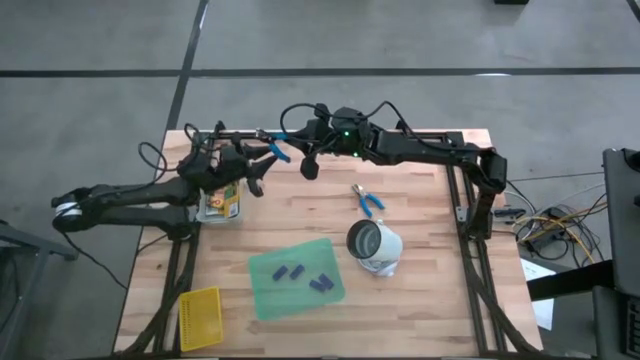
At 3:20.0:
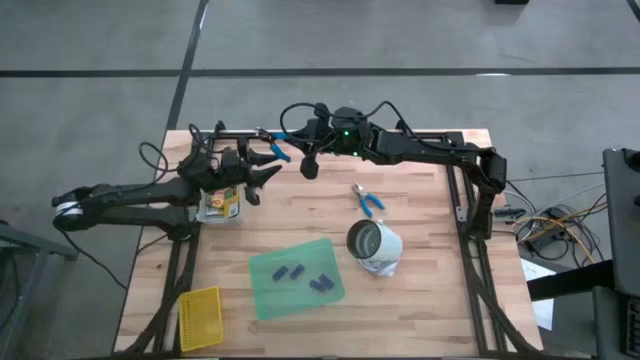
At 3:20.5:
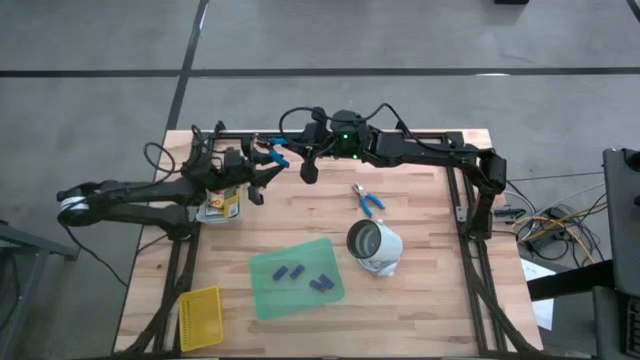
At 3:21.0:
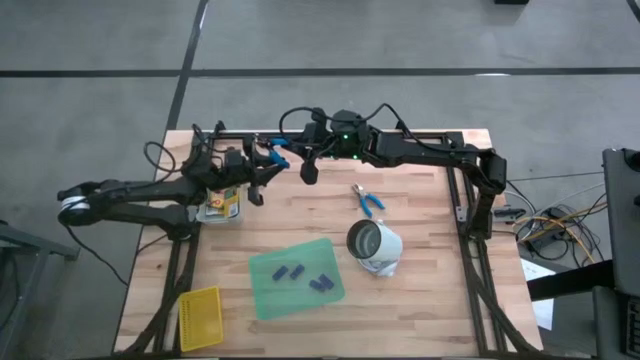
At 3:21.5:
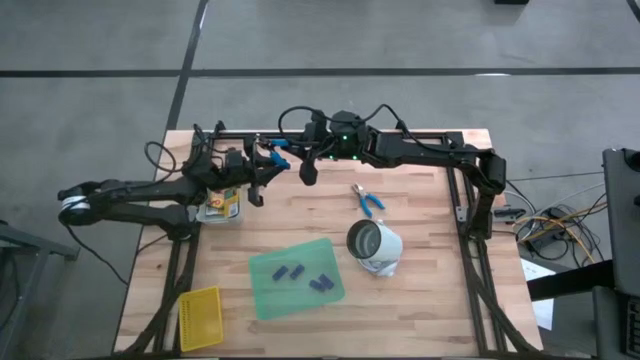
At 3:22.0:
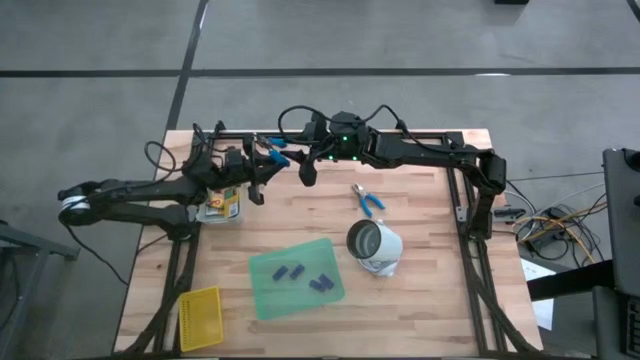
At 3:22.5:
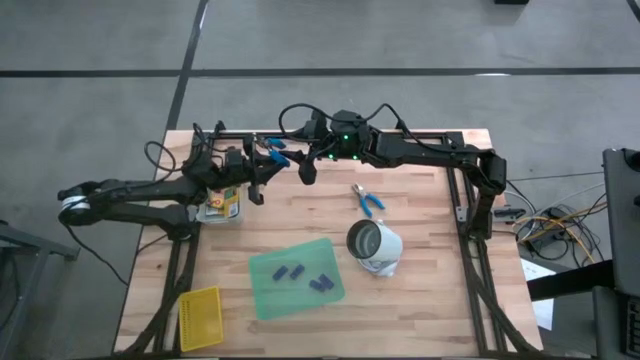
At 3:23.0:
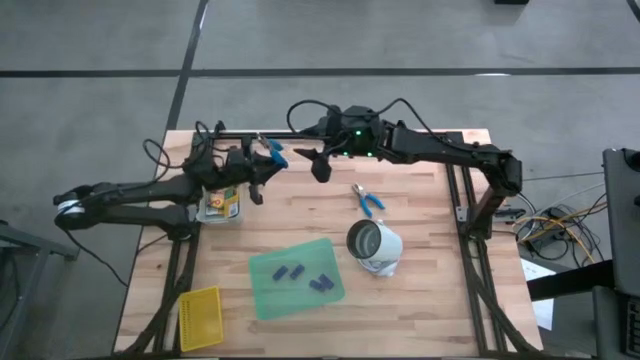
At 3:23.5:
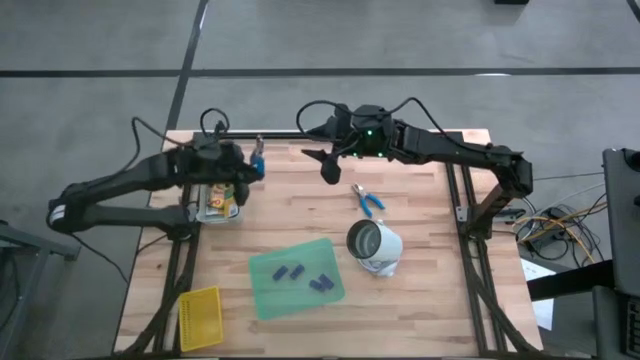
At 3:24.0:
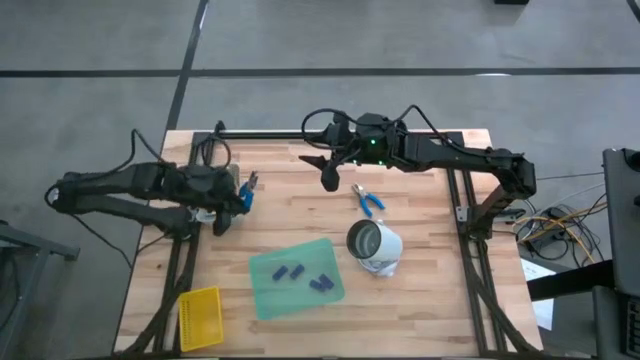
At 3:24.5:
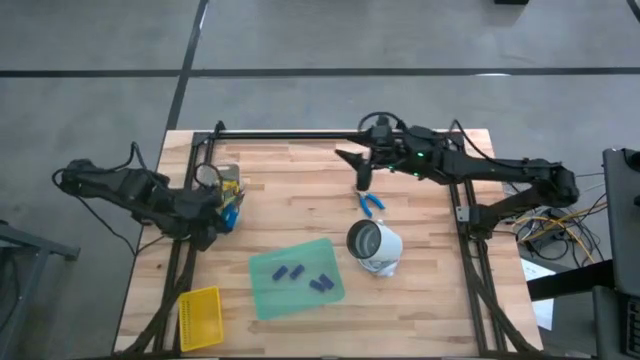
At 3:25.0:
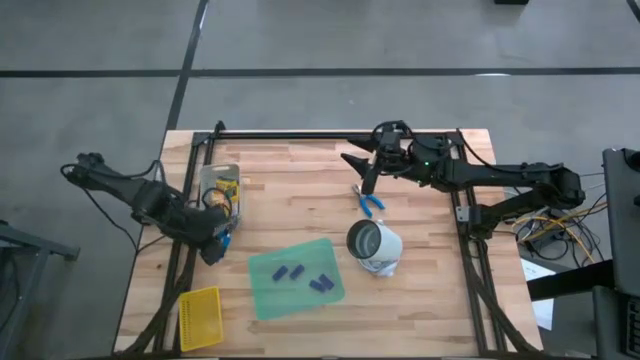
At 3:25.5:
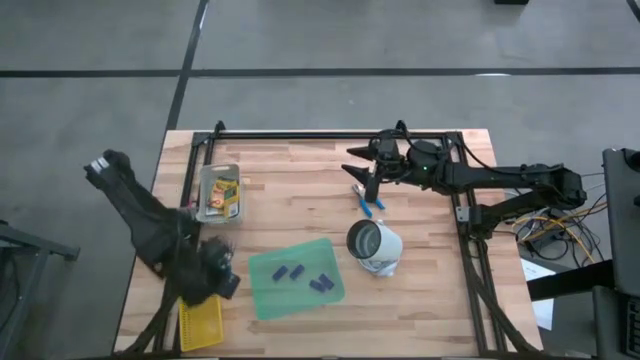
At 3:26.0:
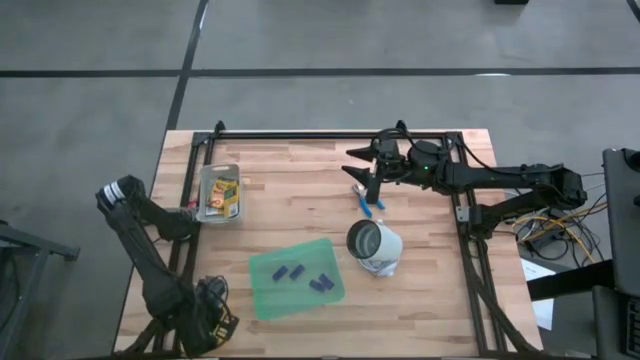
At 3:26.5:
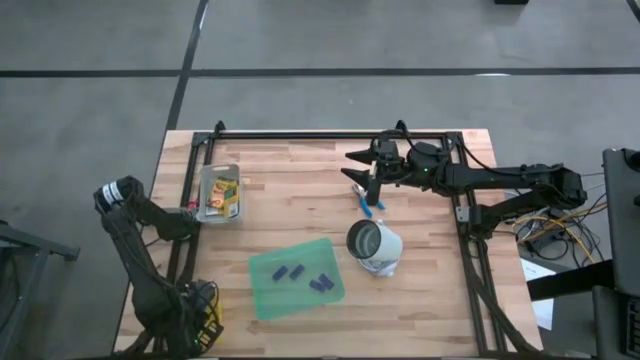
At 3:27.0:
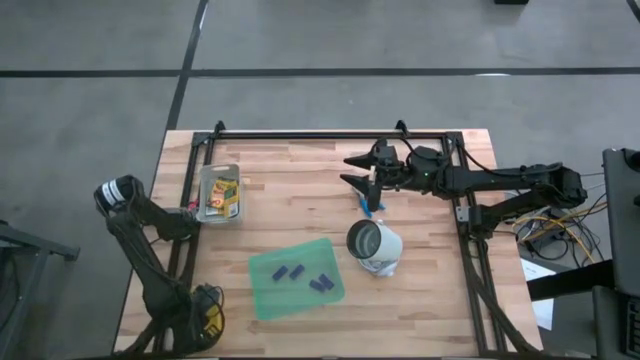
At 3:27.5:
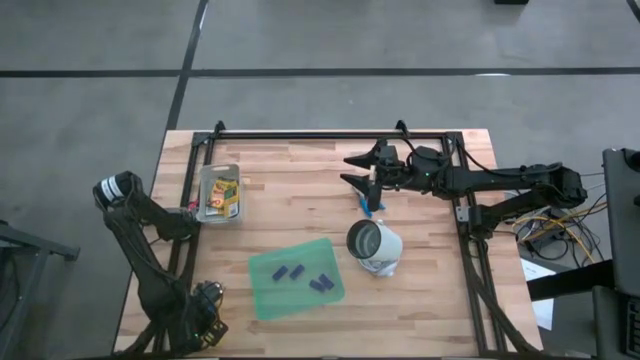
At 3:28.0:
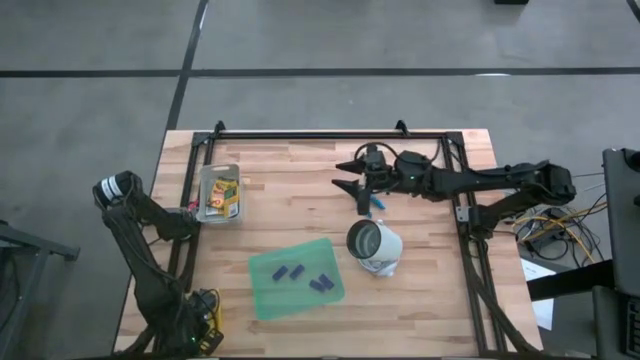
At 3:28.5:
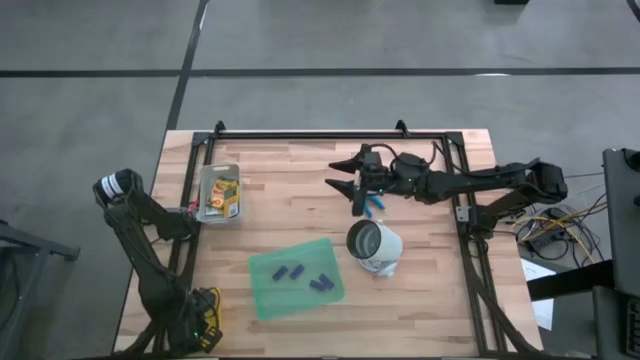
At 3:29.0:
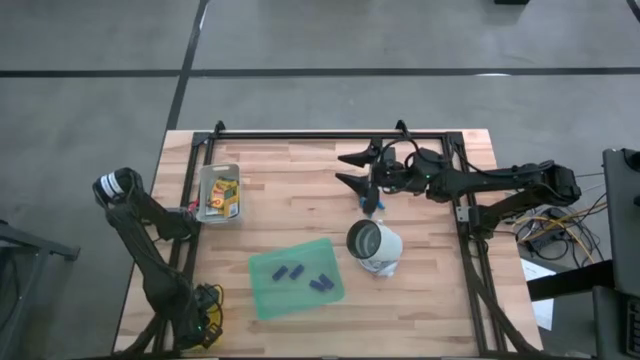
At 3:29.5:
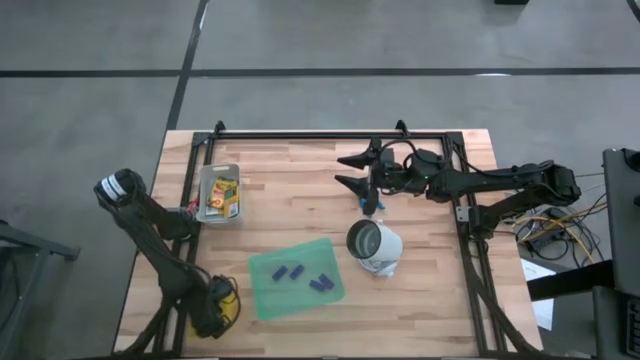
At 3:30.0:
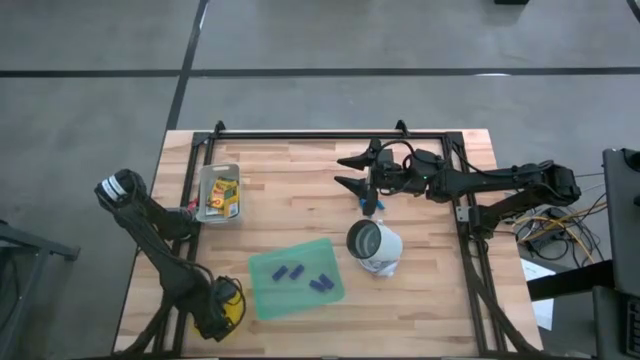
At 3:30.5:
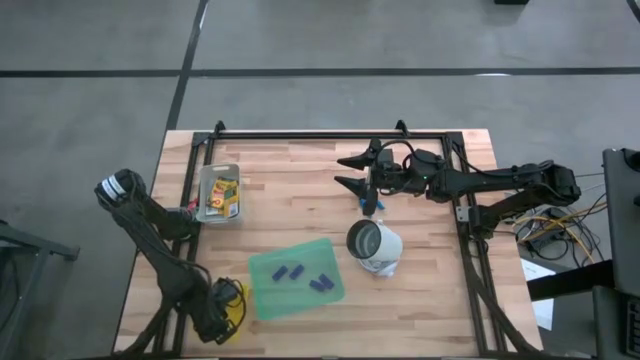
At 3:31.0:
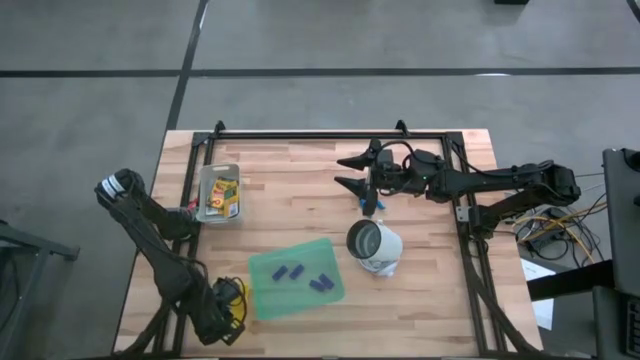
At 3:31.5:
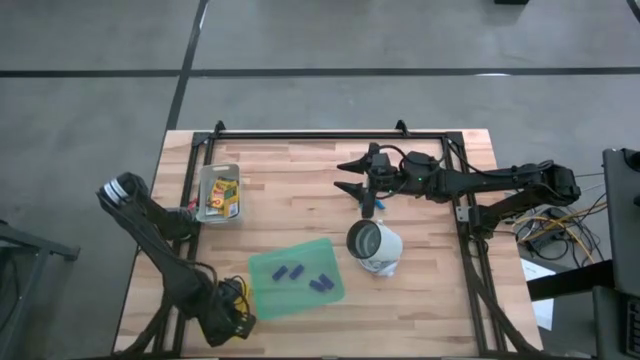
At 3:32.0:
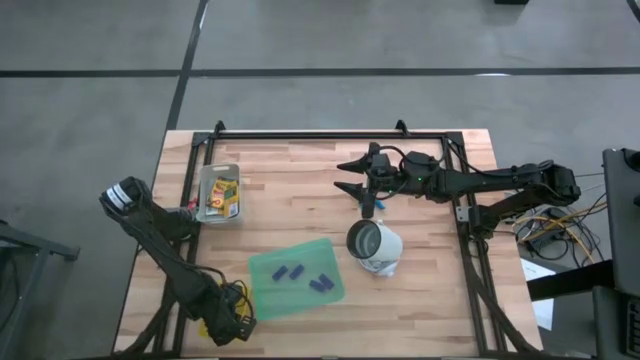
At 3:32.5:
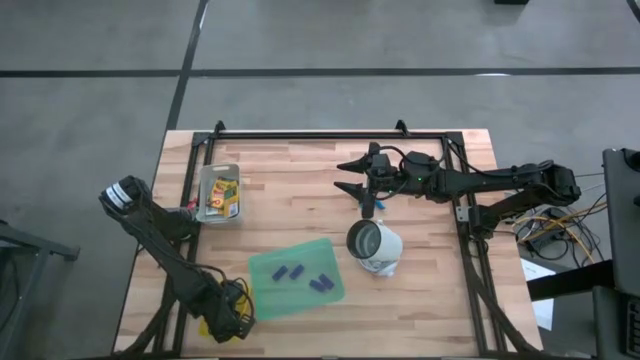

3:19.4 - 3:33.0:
Task: Pick & Place School Supplies
Put the blue hole puncher into the yellow bin

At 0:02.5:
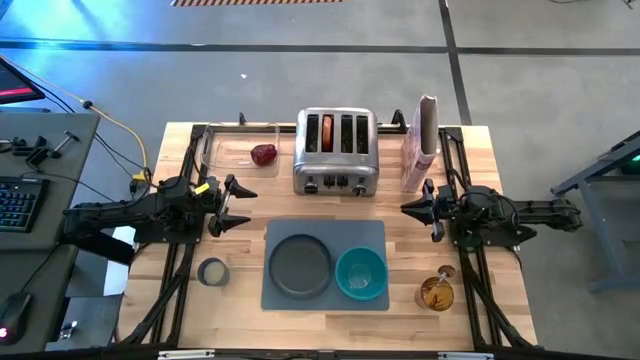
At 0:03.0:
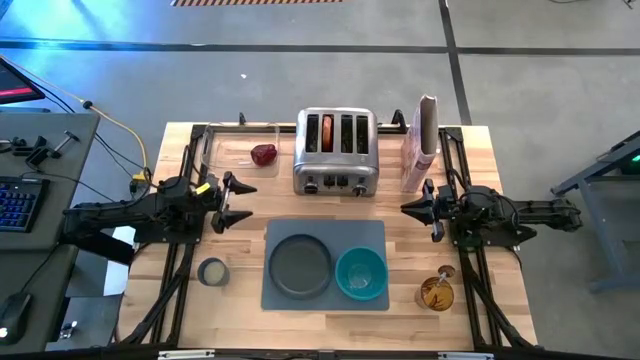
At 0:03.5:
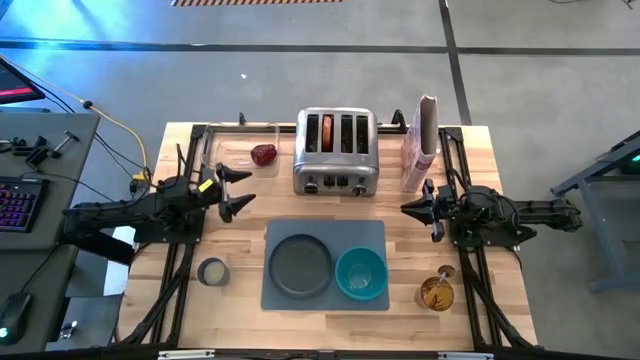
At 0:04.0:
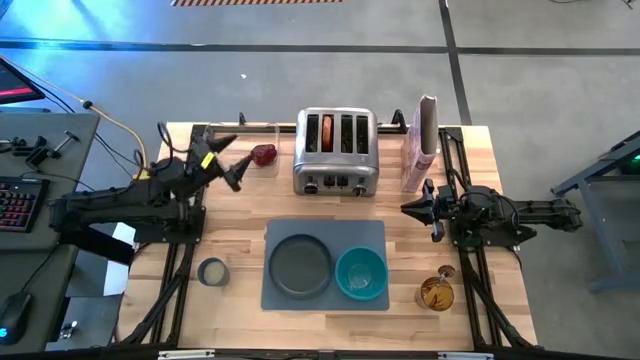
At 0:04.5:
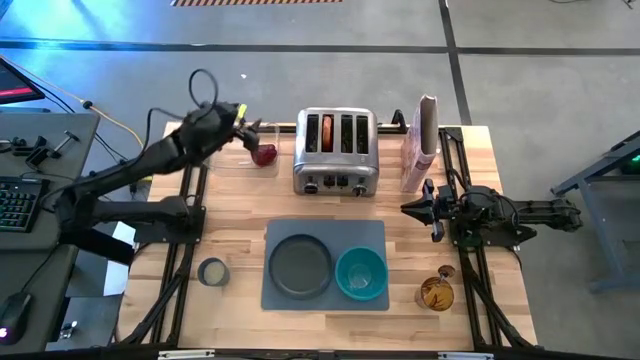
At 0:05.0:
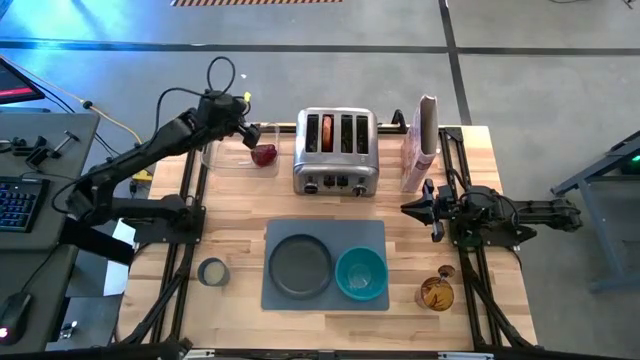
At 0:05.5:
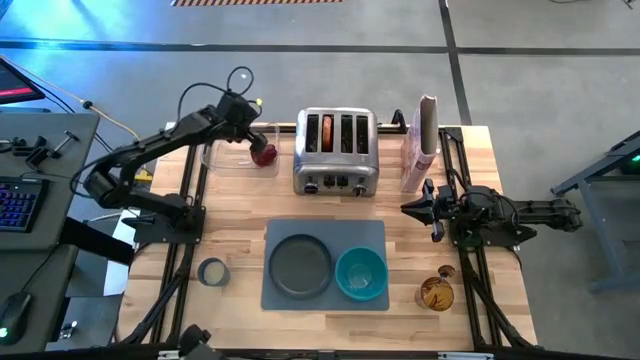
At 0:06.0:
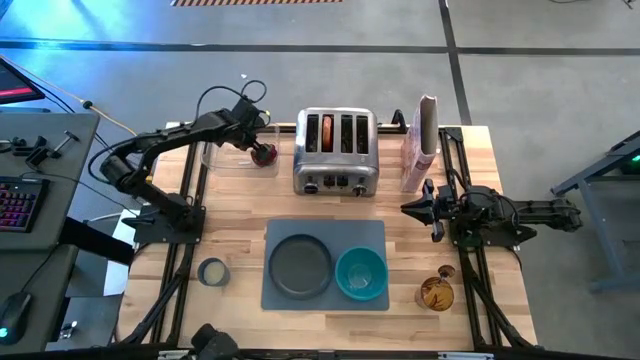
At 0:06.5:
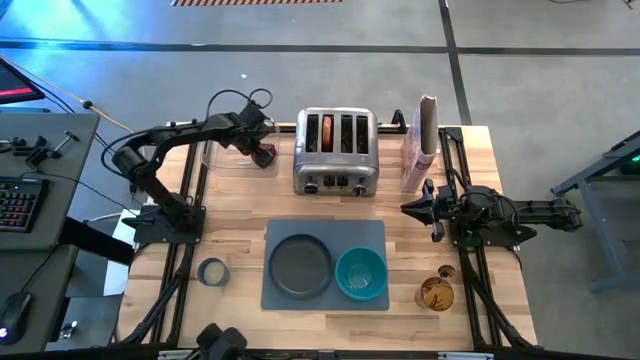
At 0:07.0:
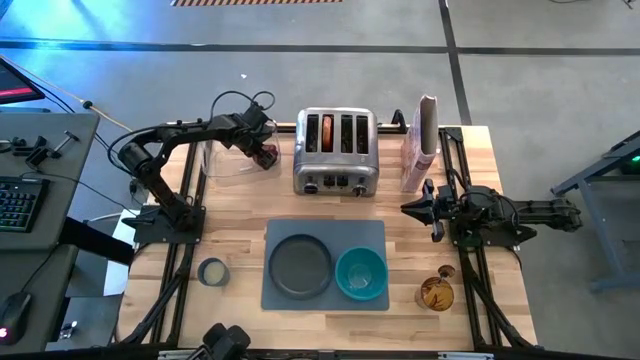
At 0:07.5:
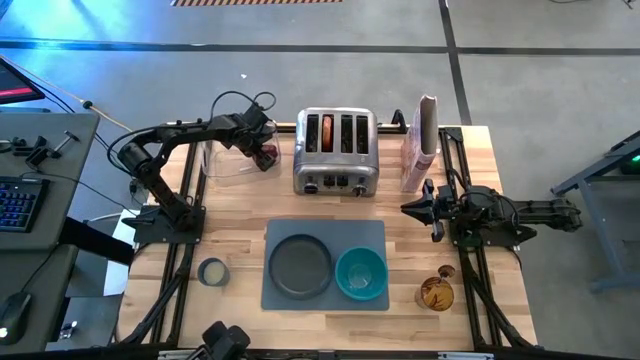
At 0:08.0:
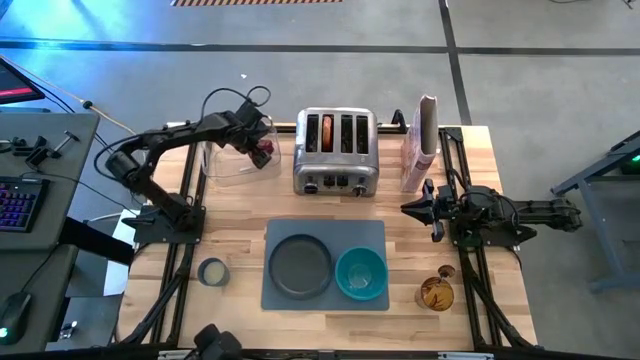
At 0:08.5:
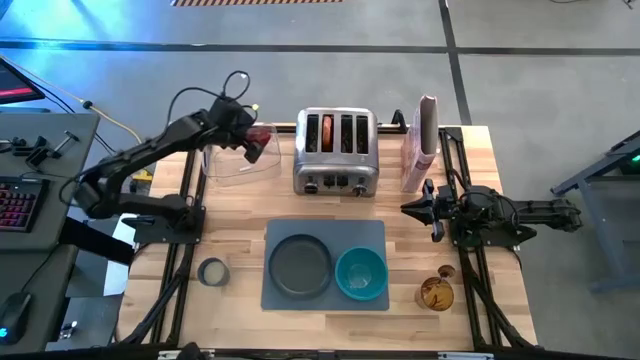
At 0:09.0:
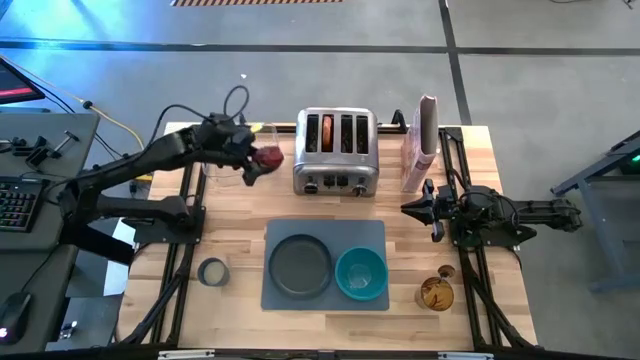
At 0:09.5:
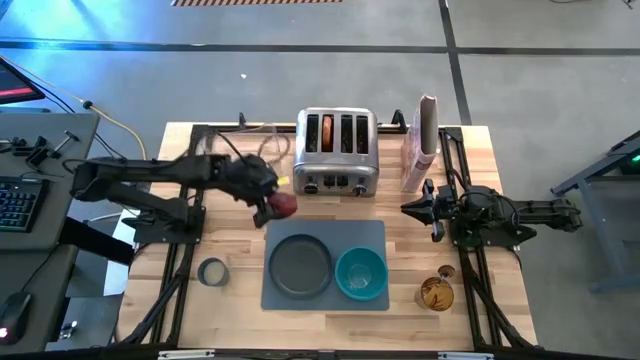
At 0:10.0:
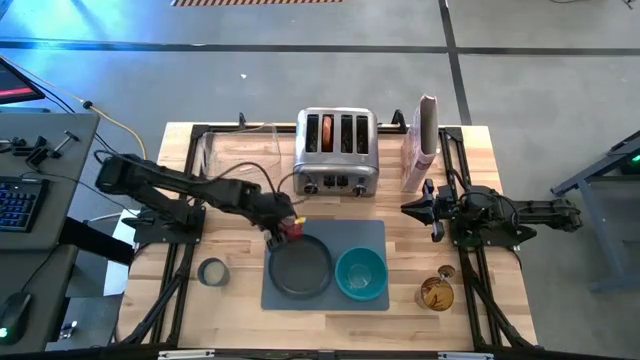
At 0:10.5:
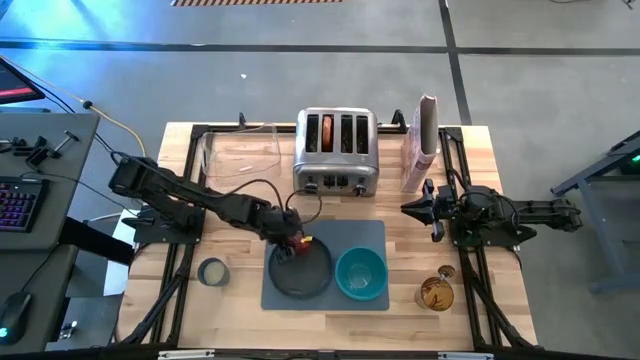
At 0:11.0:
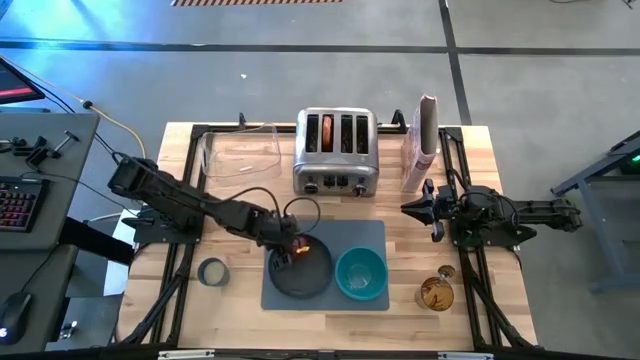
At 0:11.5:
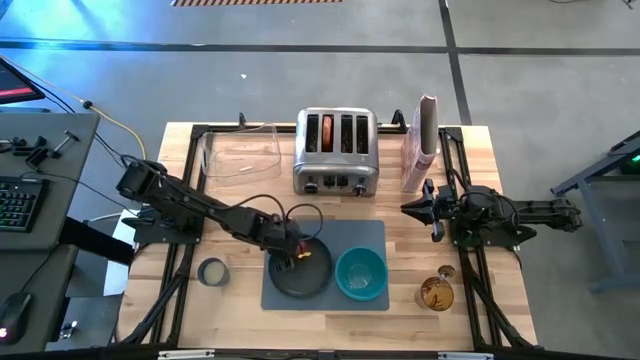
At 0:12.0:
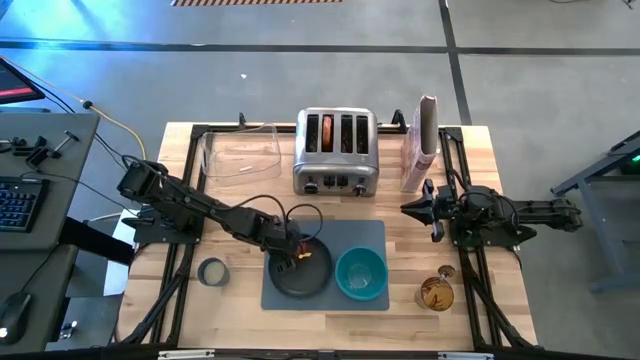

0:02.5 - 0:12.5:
Task: Arrange a breakfast setting
Put the red apple on the black plate
